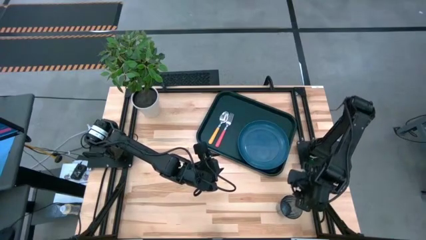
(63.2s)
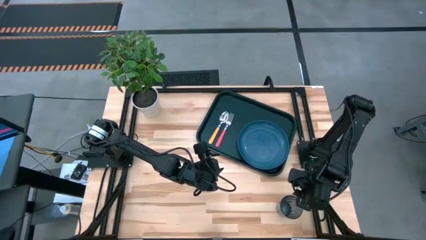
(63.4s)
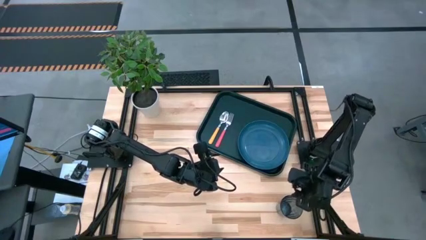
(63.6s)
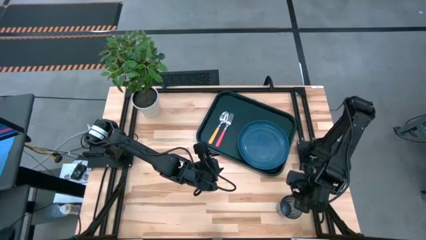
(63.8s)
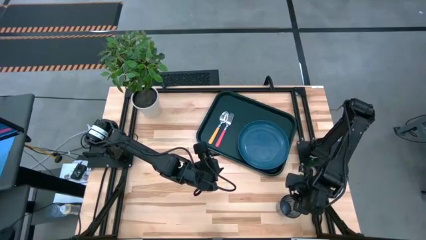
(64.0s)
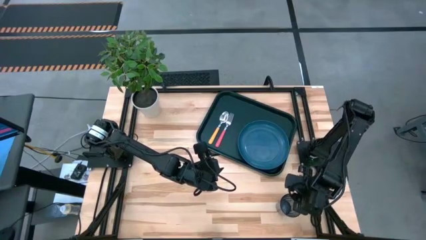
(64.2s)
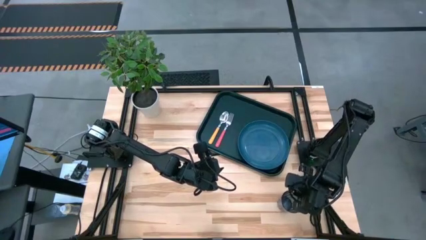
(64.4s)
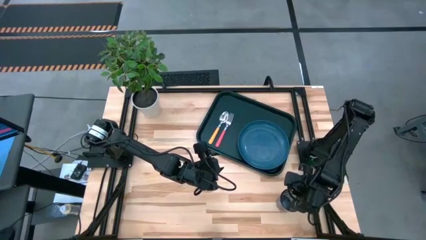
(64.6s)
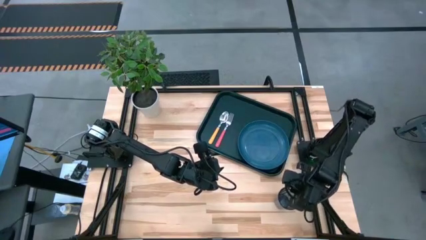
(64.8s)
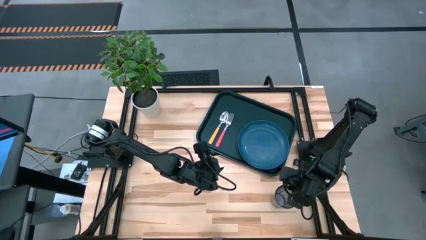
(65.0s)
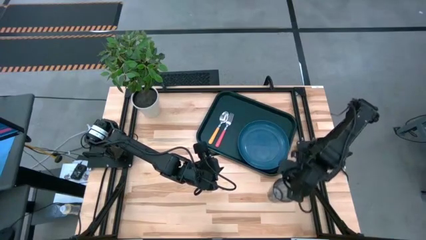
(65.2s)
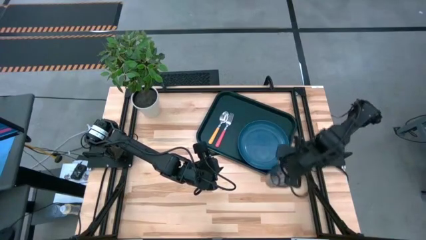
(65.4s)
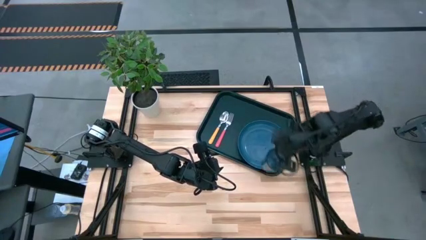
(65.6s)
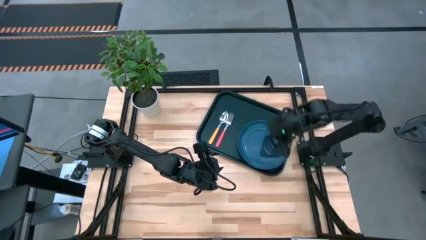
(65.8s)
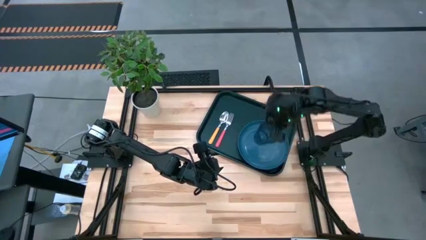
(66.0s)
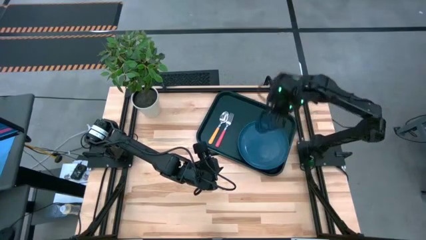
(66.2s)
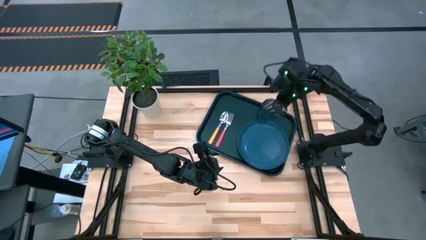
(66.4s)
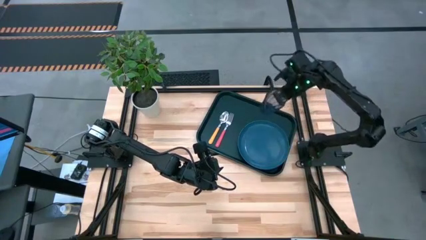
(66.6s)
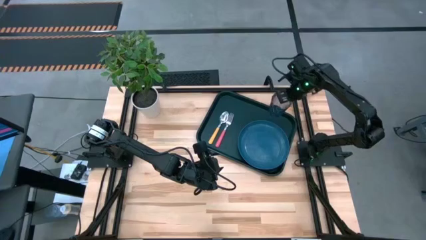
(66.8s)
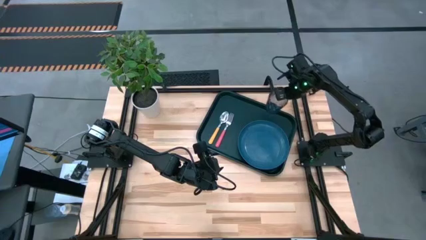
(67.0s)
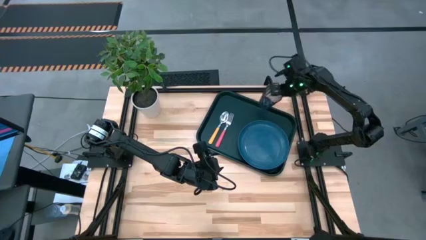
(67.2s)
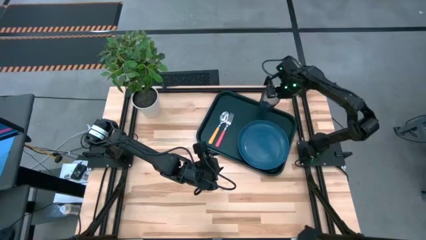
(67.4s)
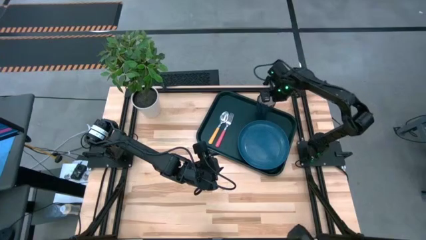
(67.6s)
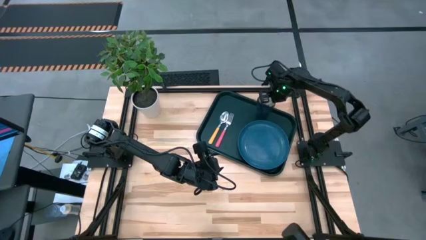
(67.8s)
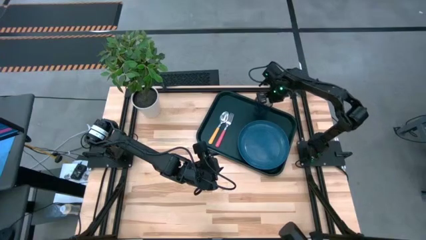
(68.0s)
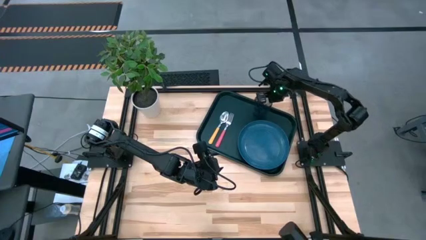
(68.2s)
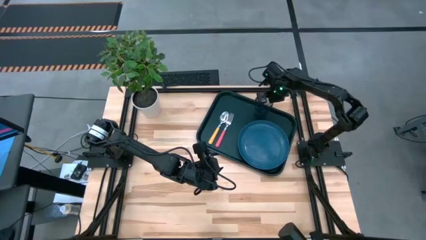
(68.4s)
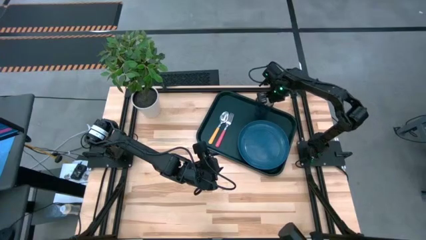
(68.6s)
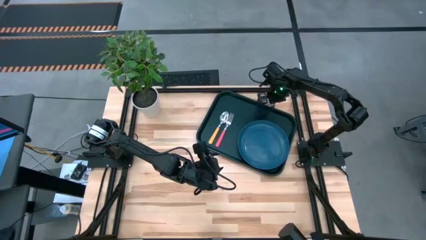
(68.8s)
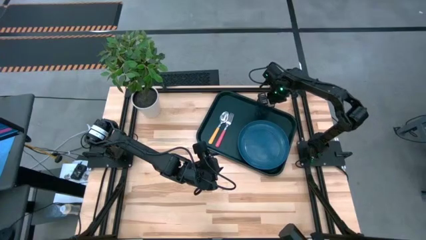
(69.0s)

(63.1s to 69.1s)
Task: Pick and place plate/cup/fork/spoon on tray
Put the blue cup on the black tray above the blue plate

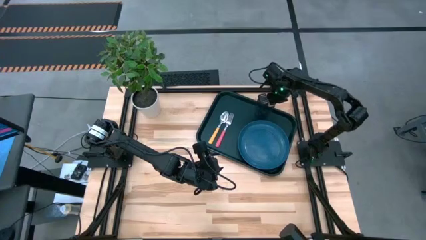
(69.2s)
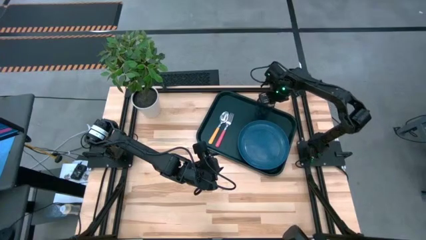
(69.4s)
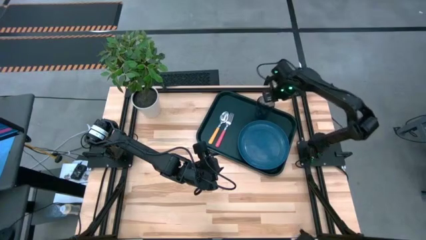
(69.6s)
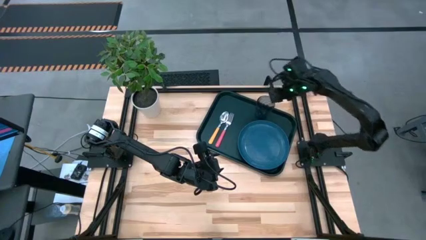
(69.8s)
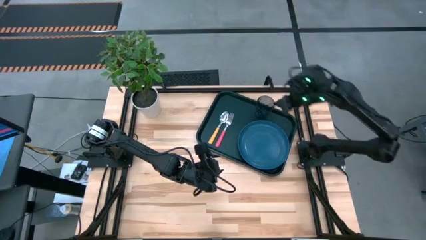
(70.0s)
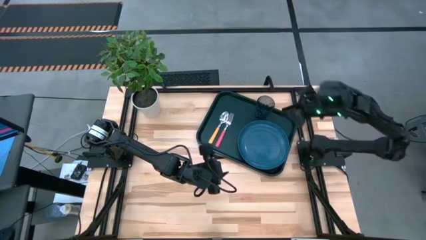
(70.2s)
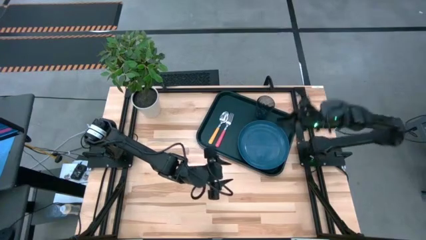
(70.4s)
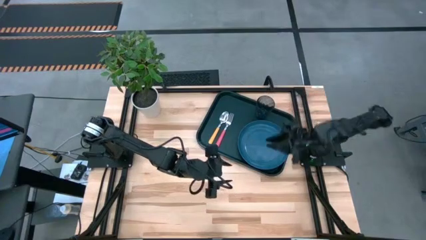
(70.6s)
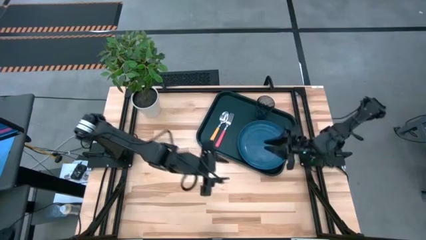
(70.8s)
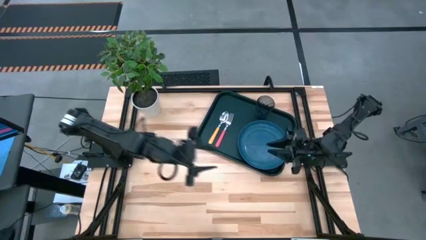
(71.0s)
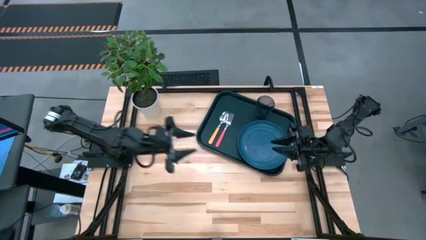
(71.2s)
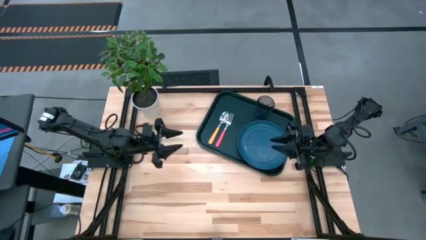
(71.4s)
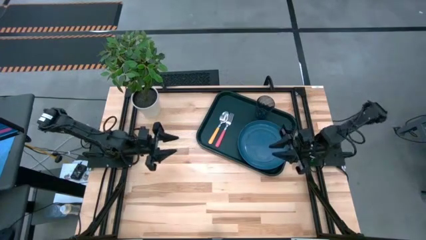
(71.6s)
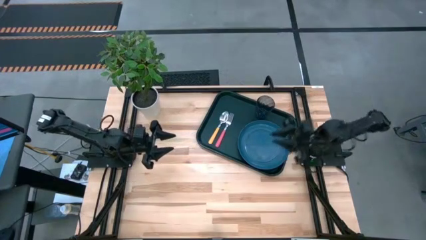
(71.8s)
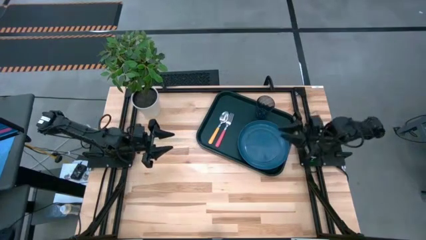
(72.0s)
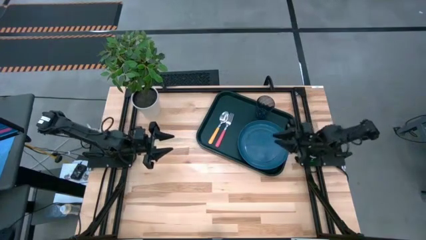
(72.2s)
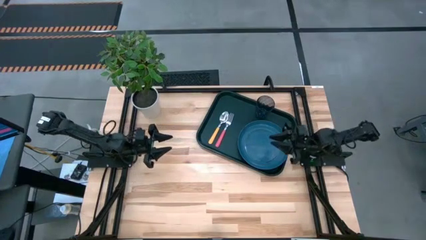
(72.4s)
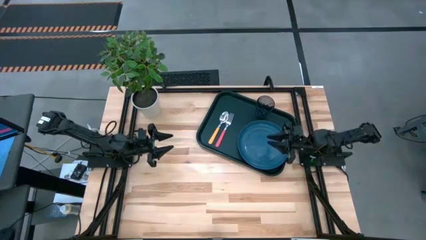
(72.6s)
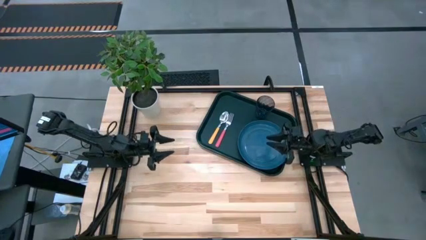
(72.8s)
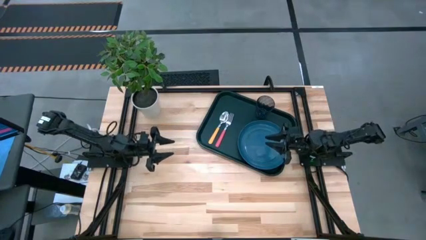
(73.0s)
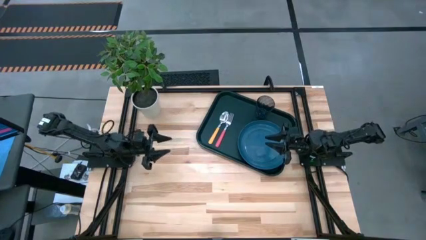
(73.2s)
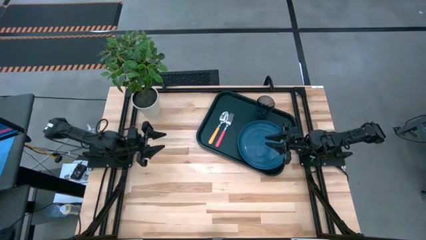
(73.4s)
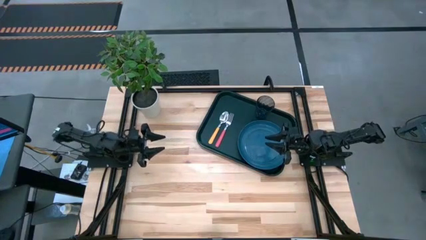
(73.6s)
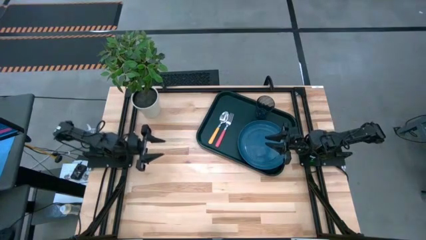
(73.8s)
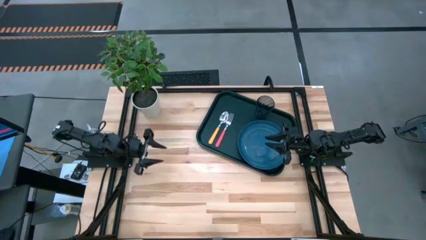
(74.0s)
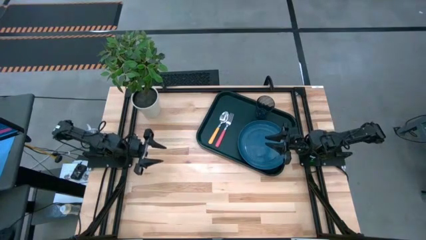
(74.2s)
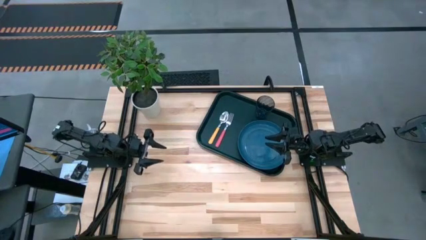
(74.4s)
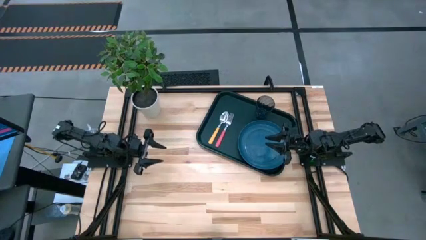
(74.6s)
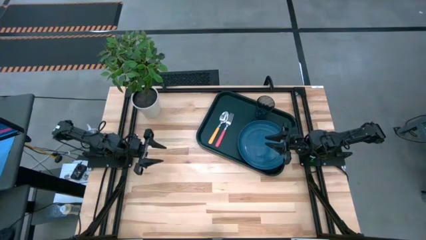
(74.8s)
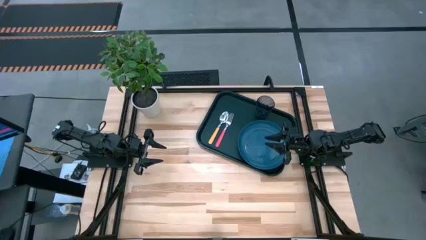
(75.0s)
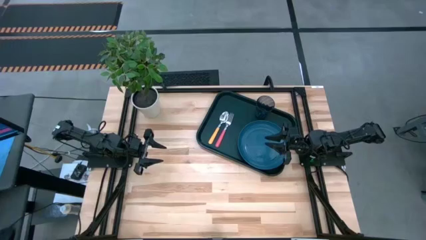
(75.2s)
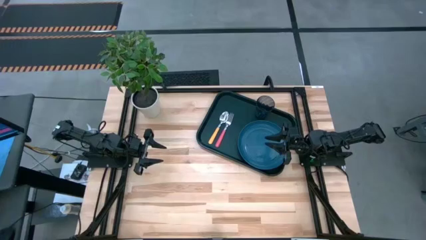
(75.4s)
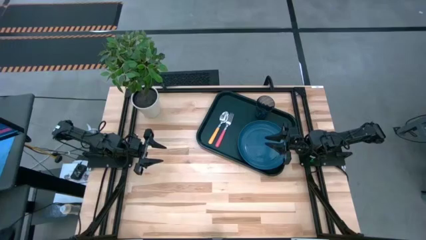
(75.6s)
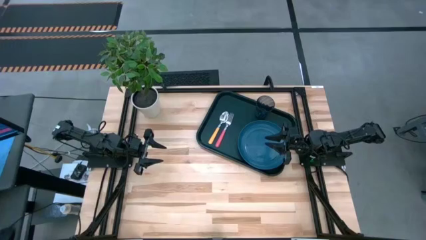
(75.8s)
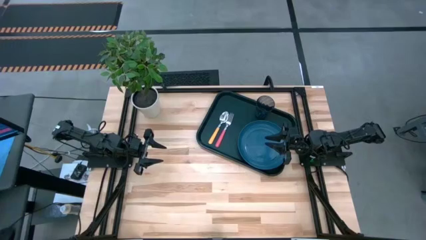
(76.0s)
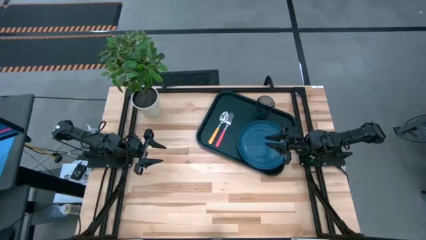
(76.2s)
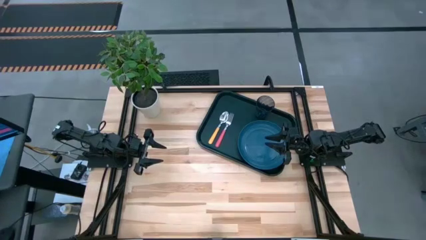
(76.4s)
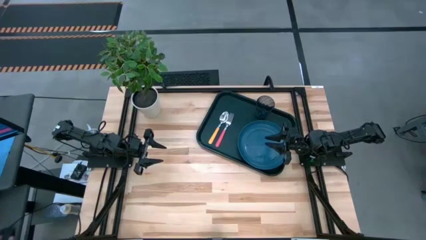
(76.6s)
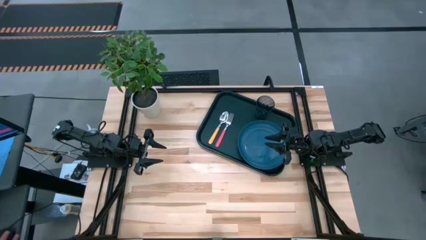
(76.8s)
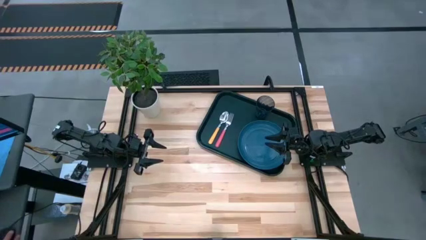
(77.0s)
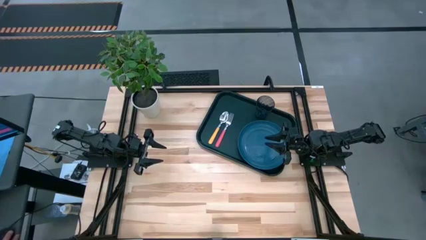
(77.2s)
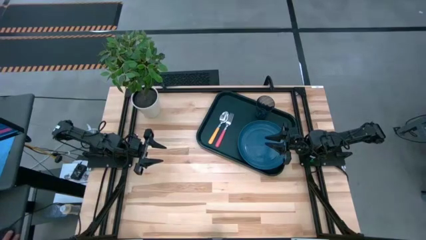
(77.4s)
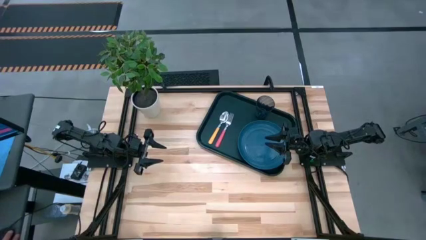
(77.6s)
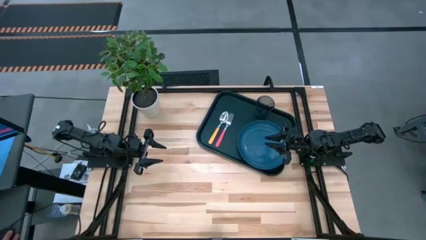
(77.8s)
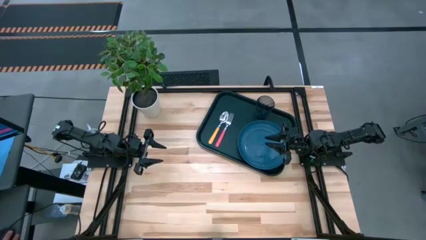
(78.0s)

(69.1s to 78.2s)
Return to Home Position
